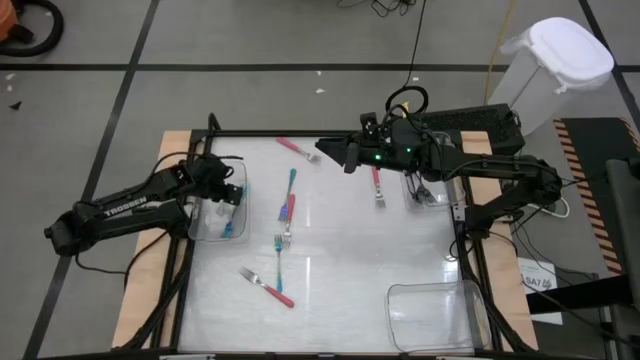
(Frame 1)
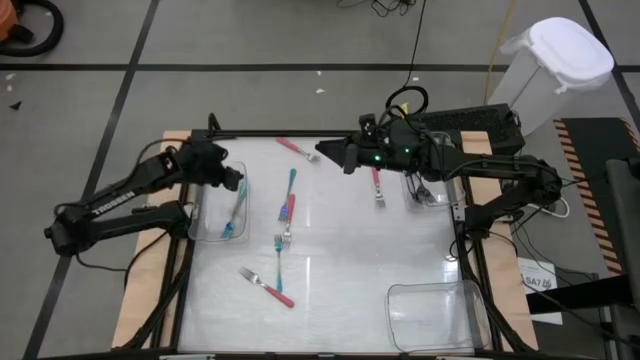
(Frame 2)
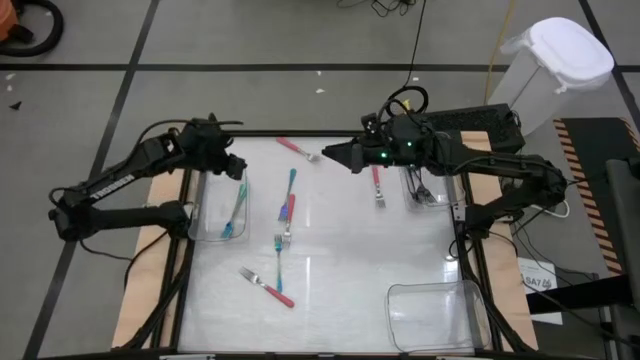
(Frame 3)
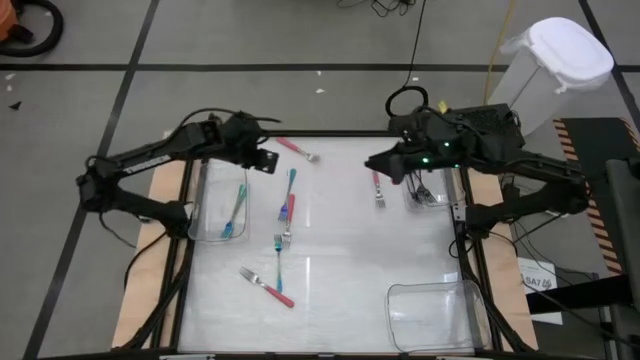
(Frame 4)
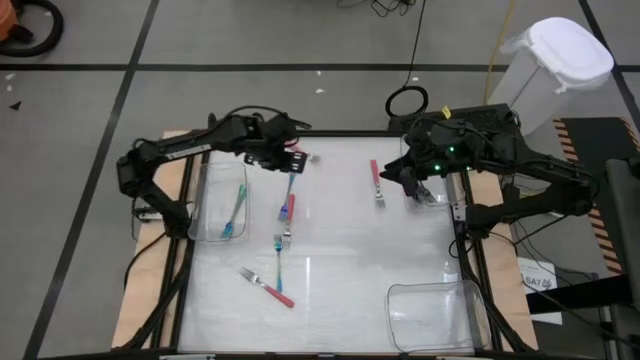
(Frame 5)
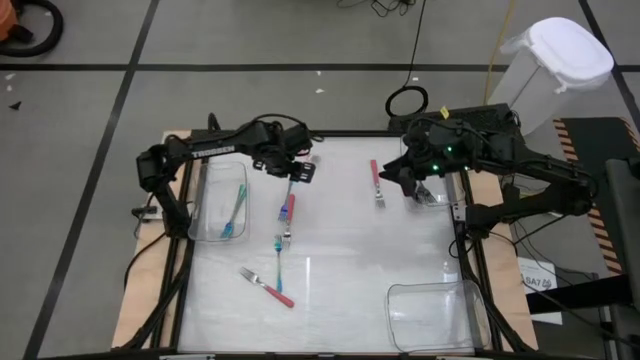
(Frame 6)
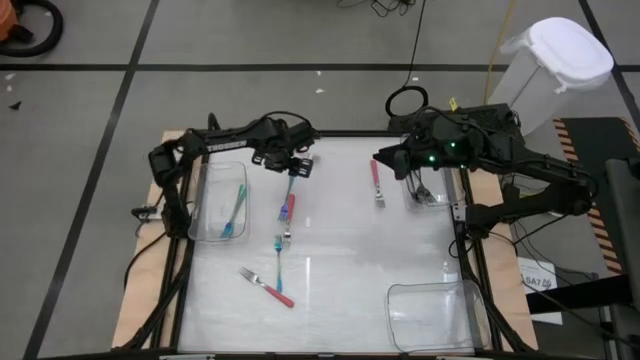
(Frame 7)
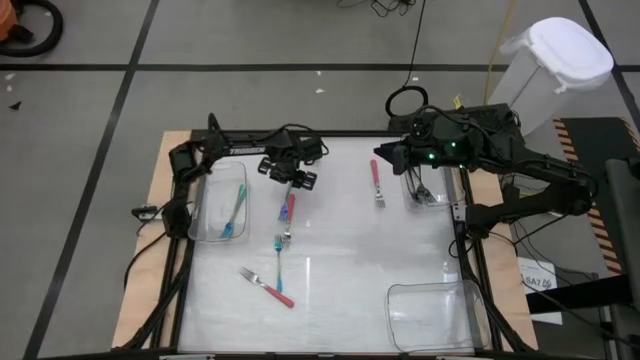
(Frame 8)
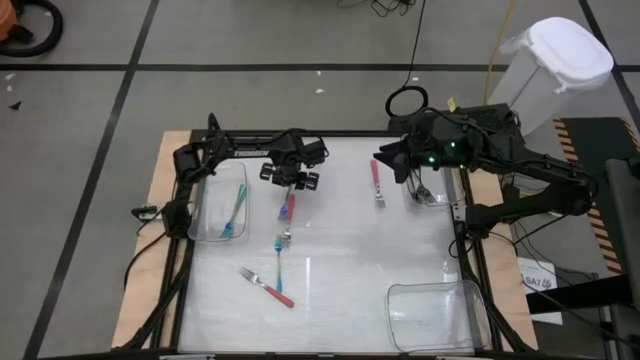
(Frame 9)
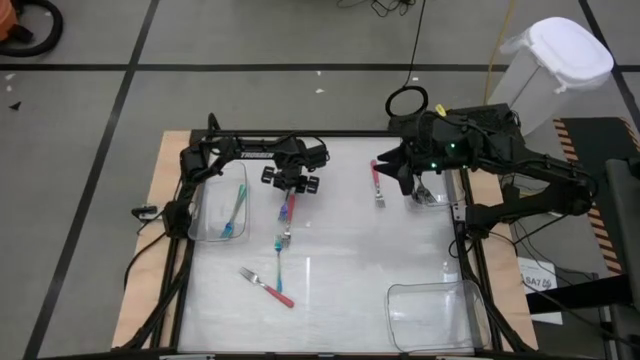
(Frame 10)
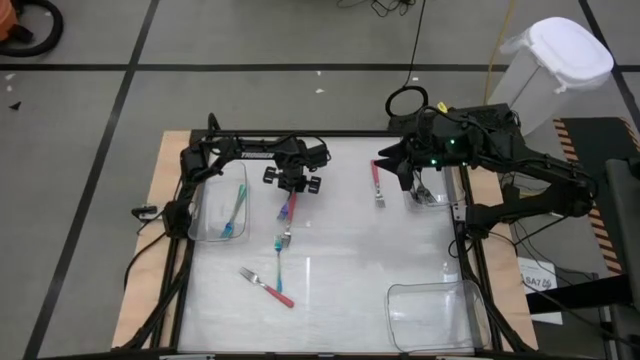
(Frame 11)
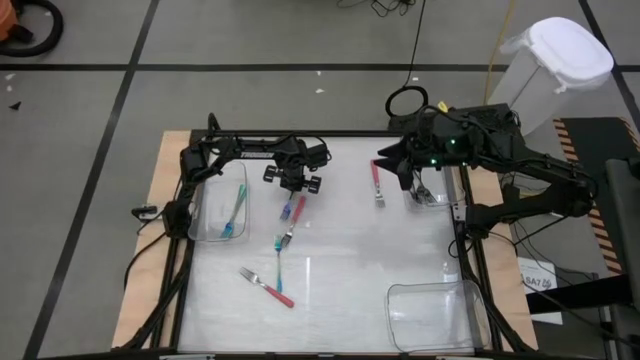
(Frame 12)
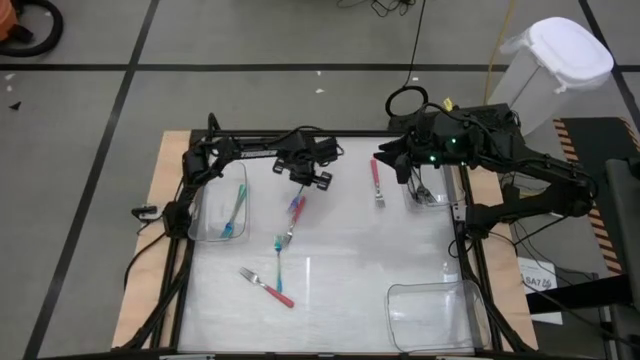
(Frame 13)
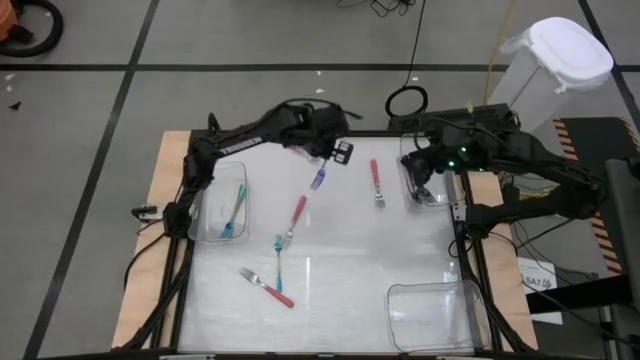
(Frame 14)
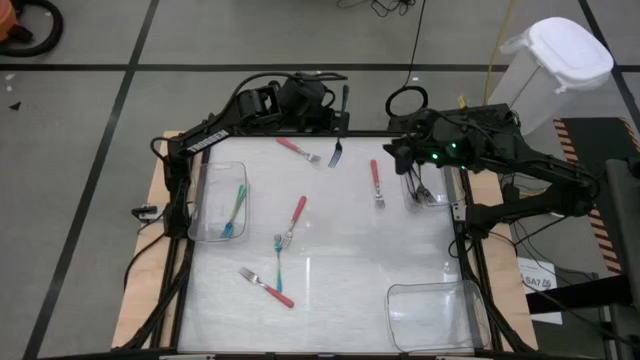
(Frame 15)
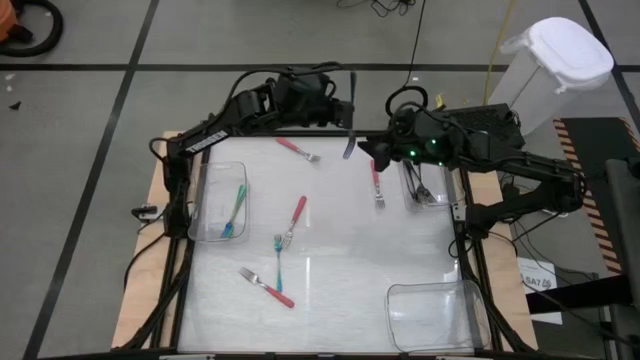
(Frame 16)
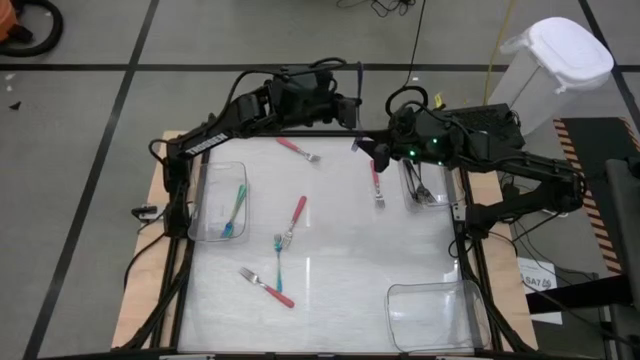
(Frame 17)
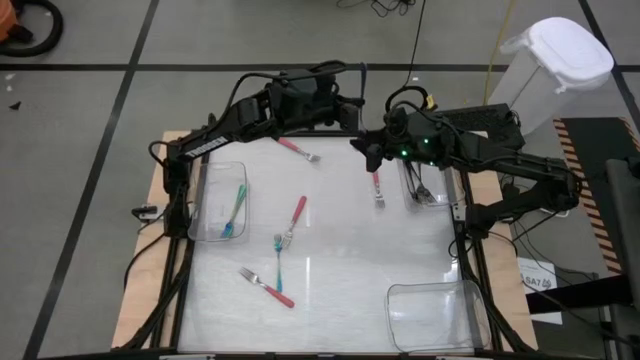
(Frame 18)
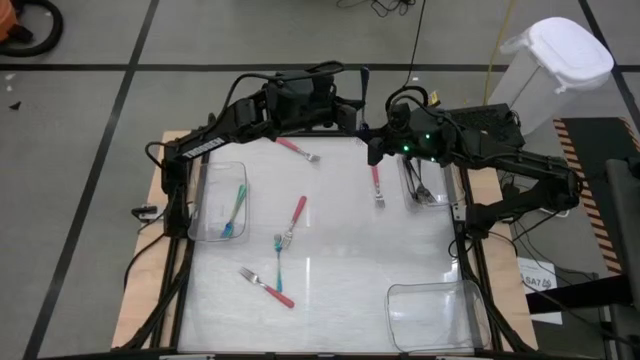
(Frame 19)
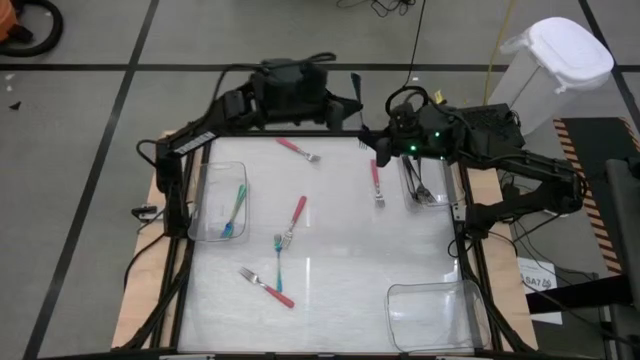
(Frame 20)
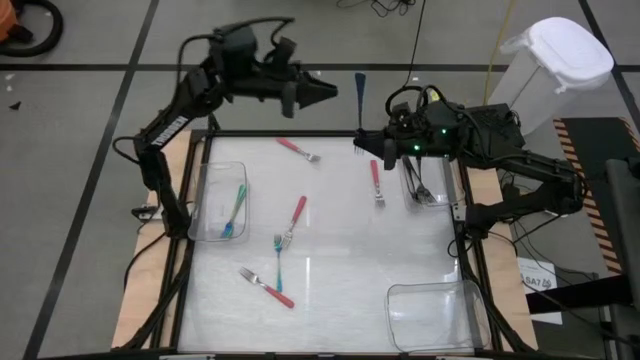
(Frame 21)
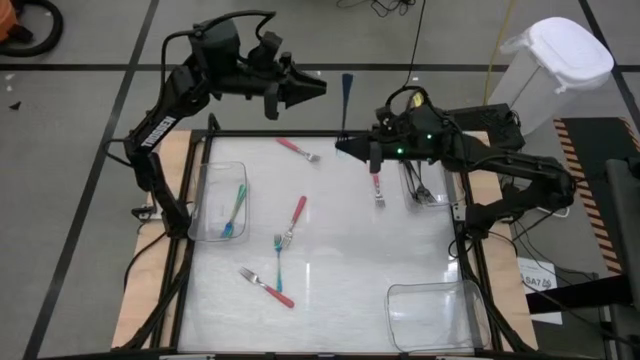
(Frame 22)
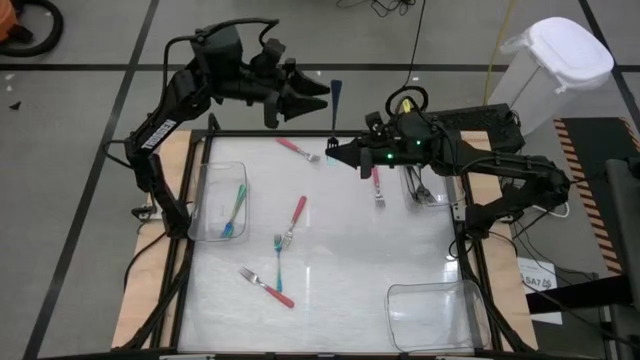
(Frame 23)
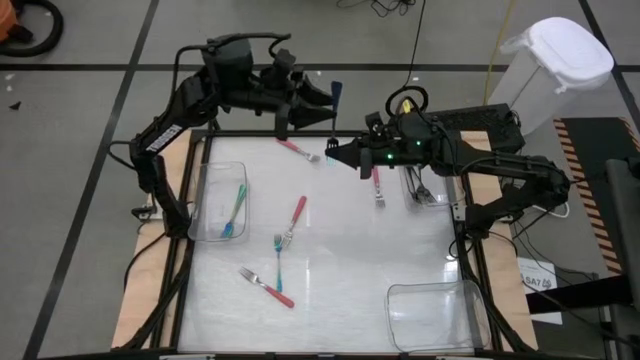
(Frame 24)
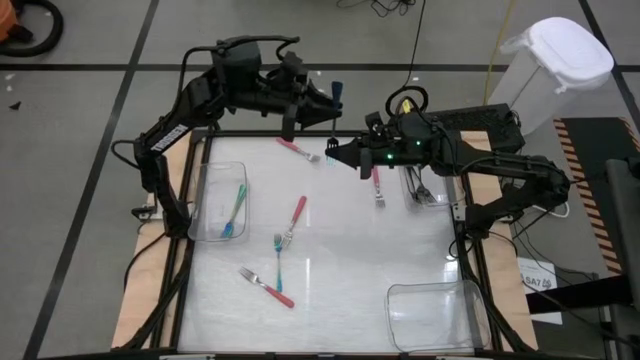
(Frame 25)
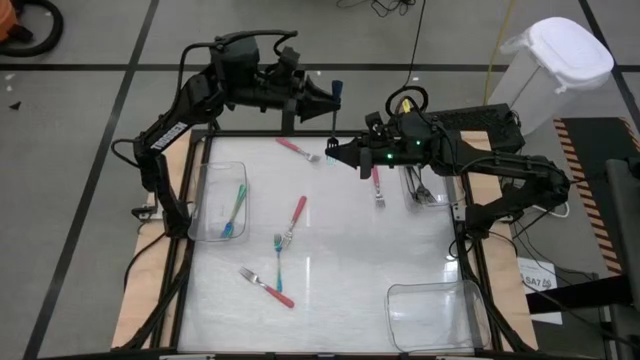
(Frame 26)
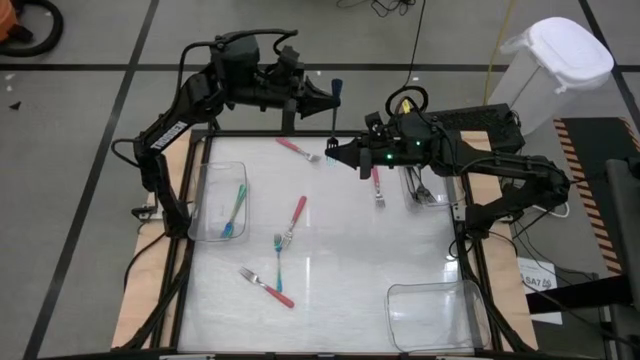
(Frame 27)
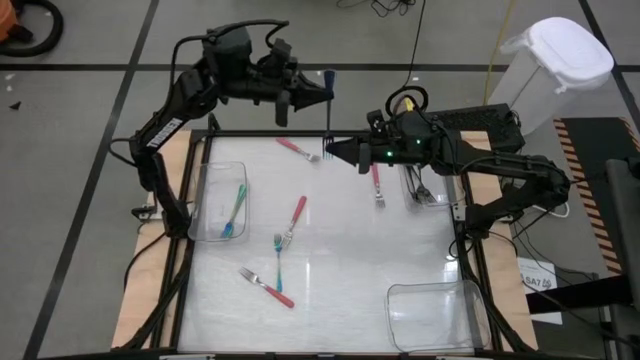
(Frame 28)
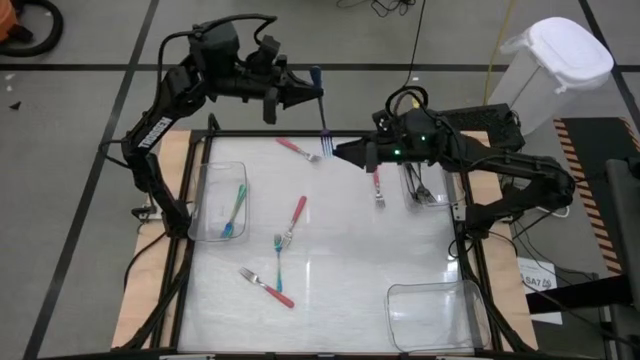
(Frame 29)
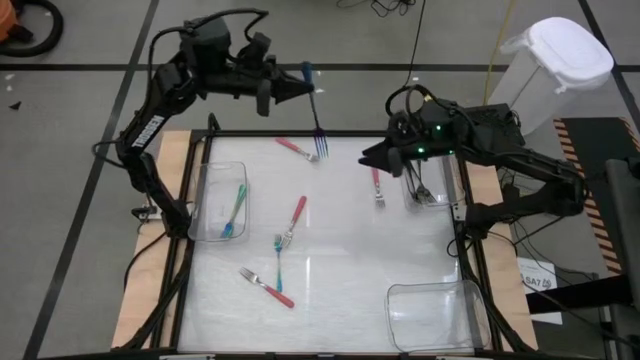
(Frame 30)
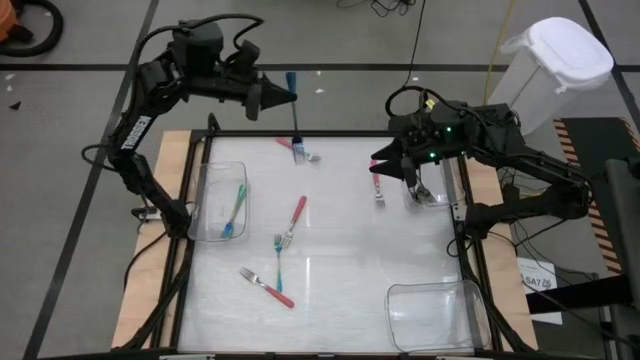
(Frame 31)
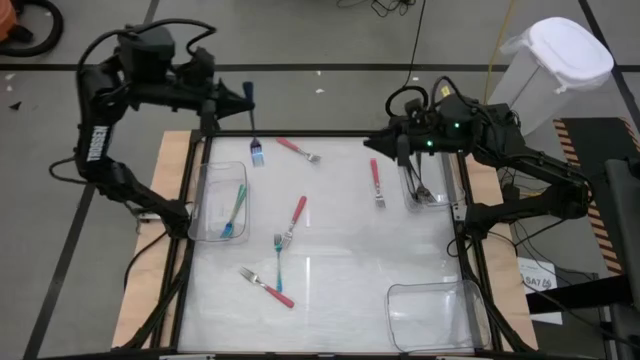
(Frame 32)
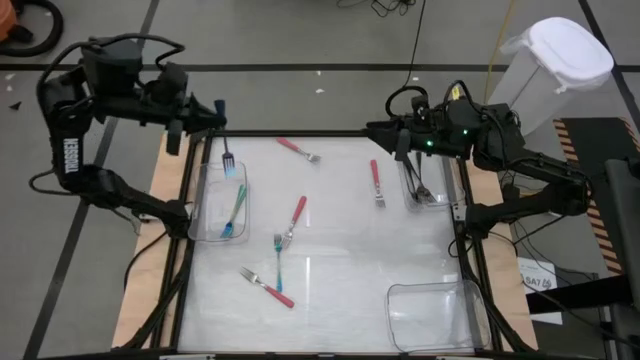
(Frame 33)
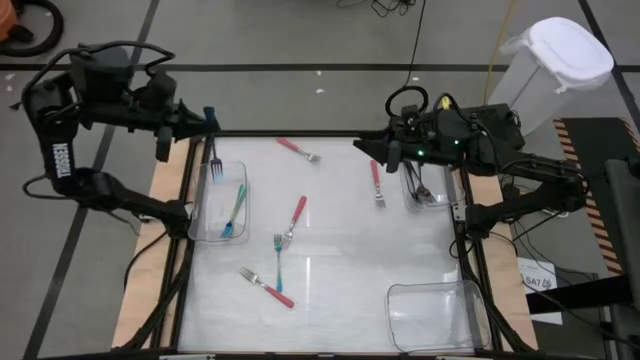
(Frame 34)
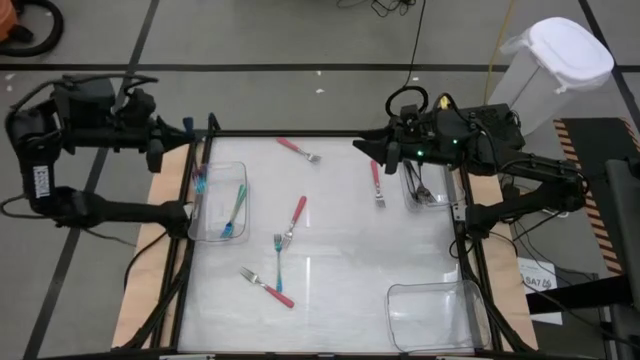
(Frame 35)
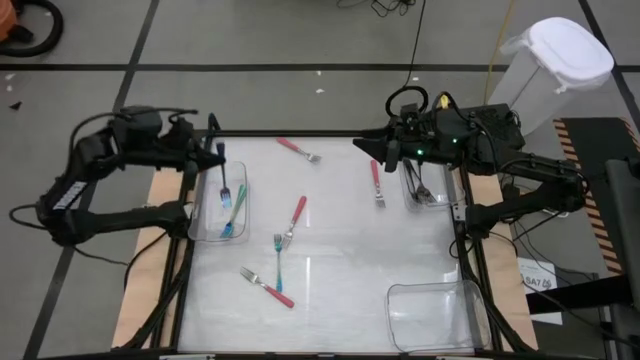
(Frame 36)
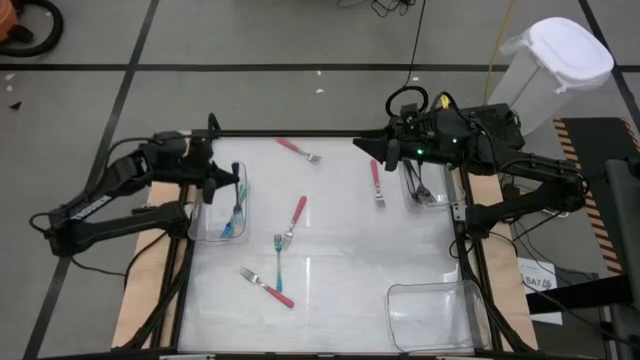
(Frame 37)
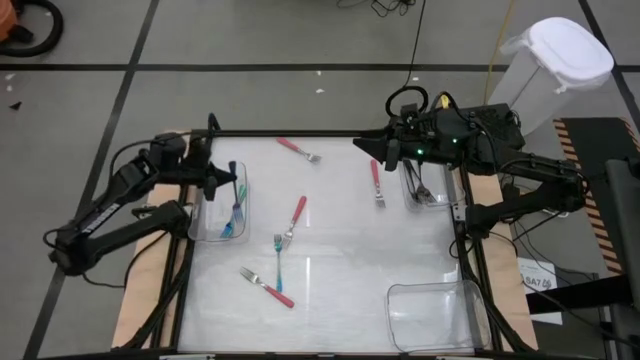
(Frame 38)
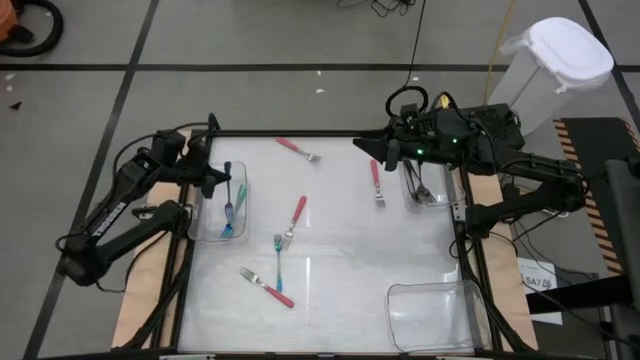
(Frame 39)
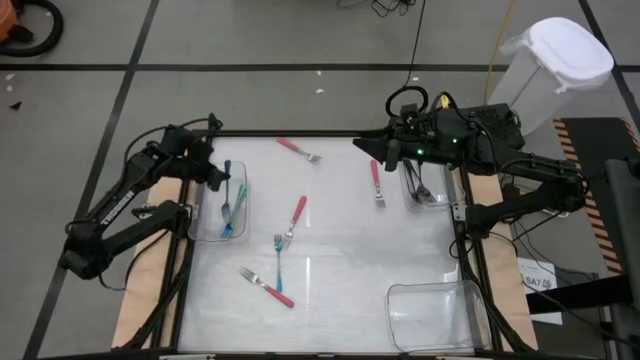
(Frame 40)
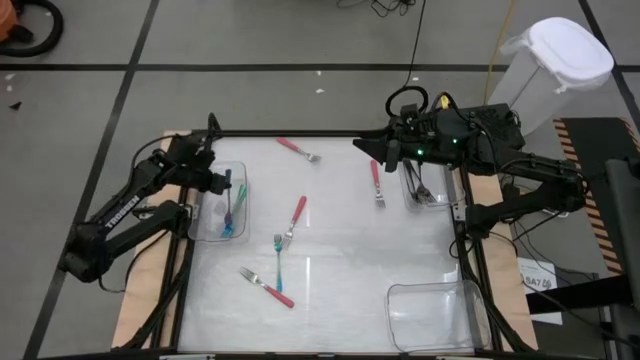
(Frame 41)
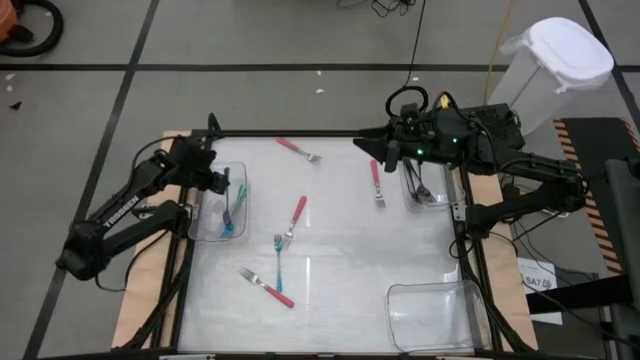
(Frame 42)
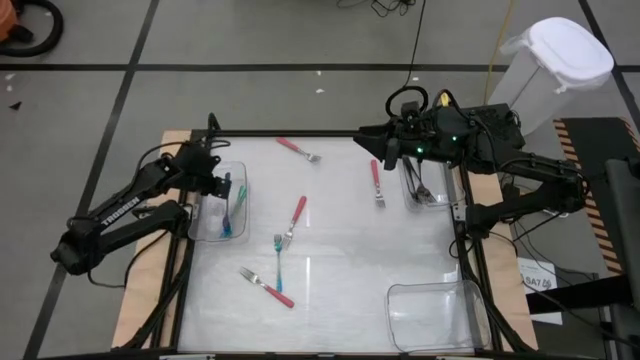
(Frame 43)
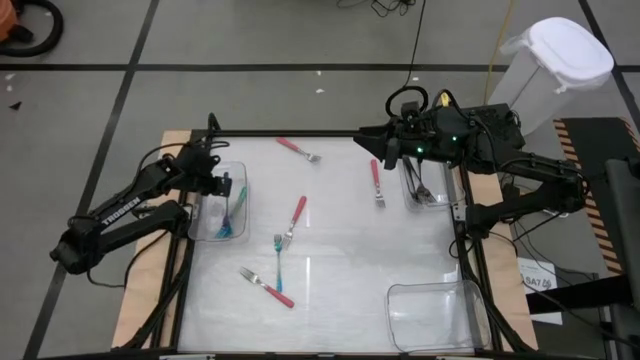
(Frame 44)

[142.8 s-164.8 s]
Task: Sort silverware by color (type)
Put the blue fork into the left transparent bin
